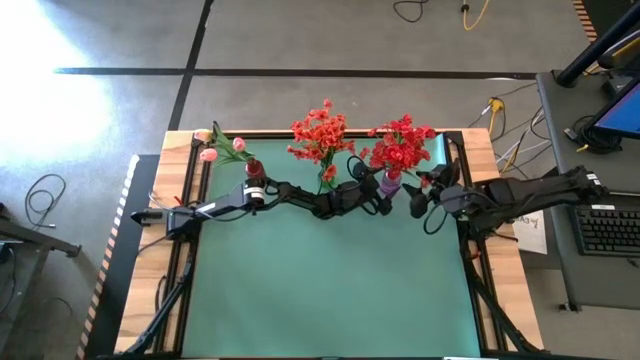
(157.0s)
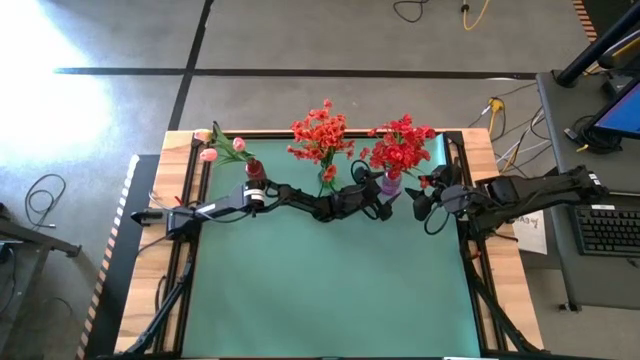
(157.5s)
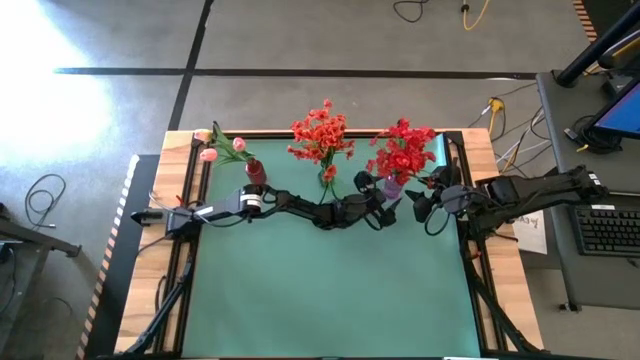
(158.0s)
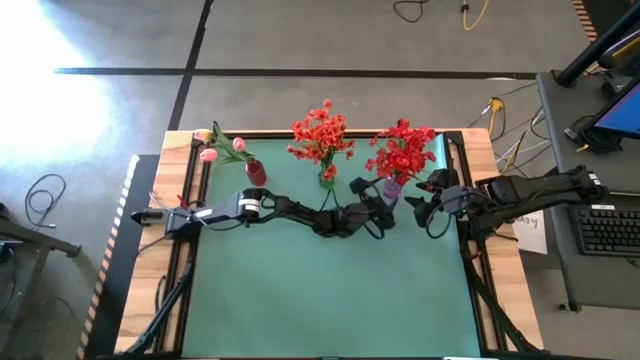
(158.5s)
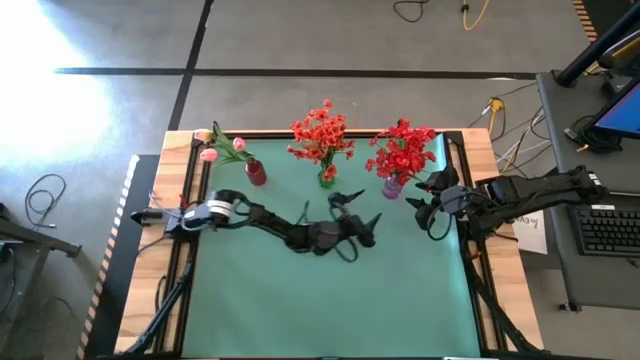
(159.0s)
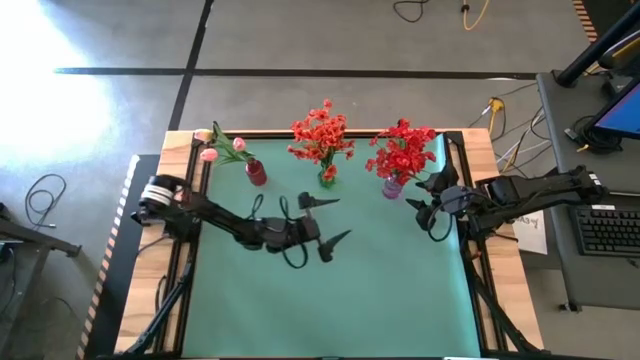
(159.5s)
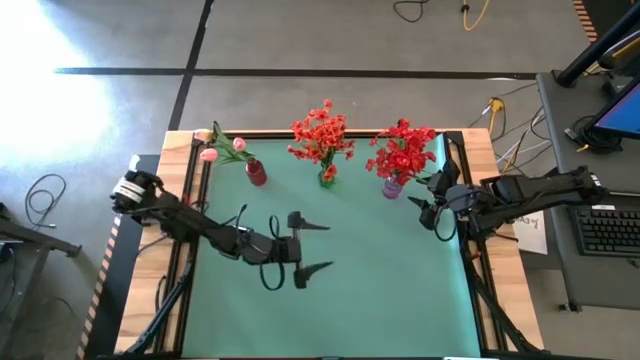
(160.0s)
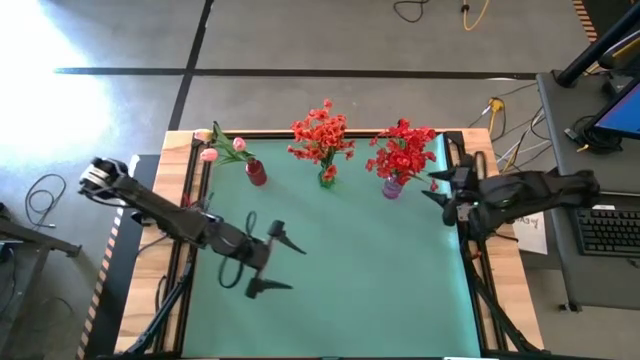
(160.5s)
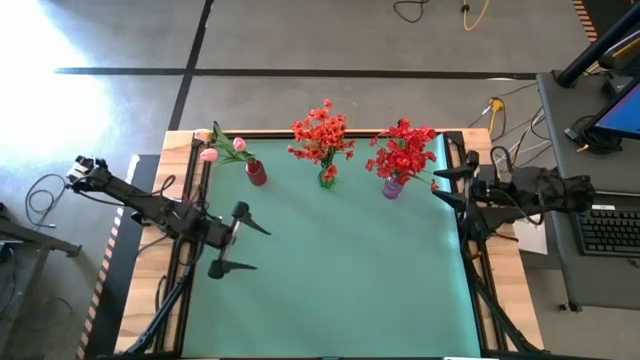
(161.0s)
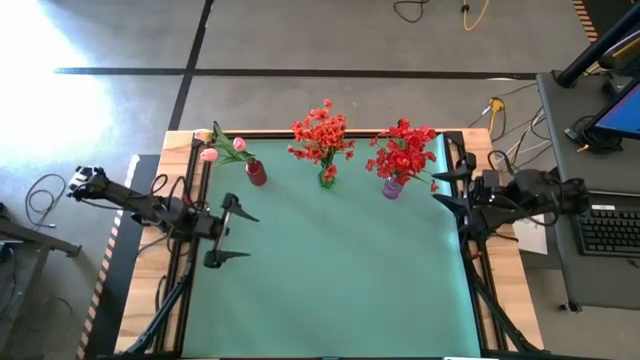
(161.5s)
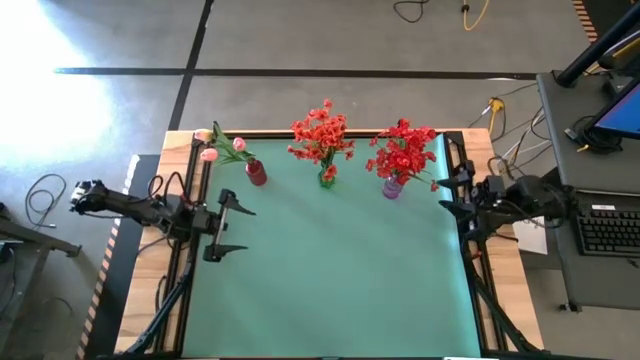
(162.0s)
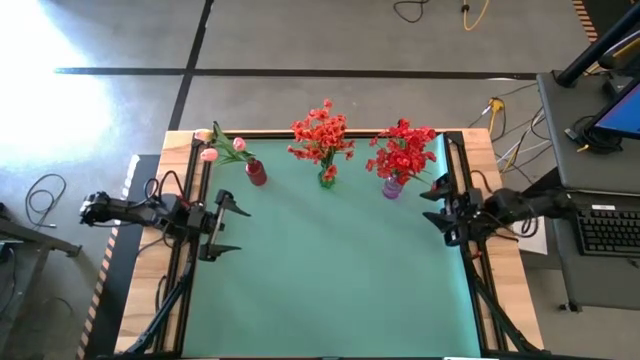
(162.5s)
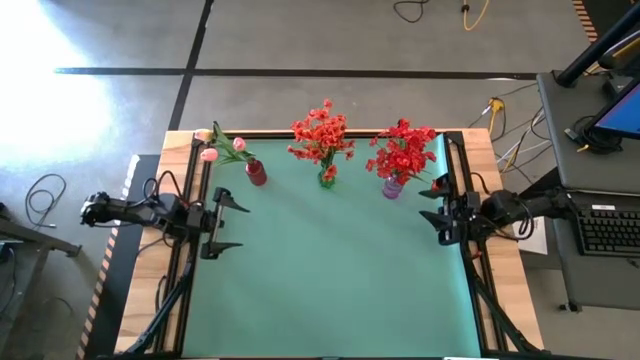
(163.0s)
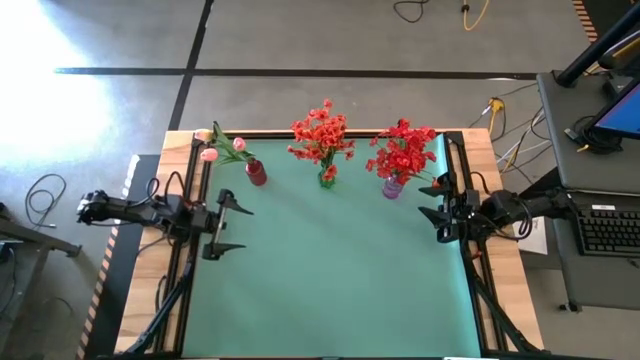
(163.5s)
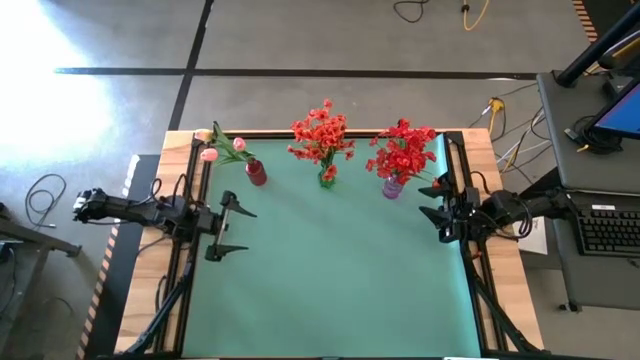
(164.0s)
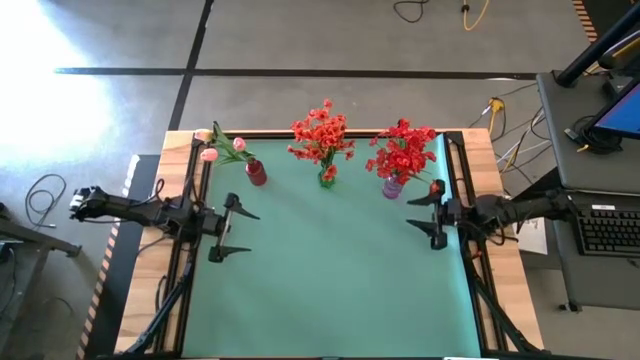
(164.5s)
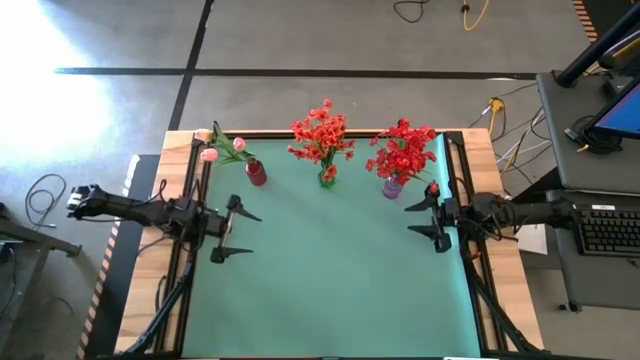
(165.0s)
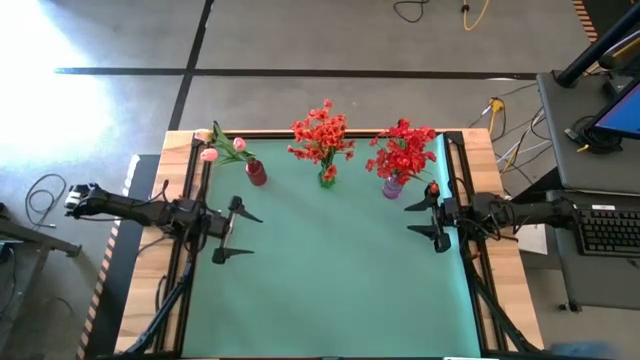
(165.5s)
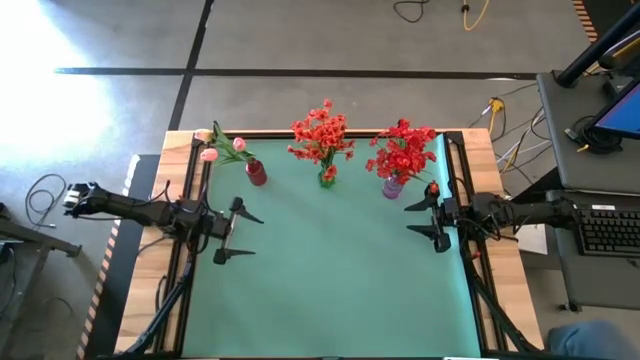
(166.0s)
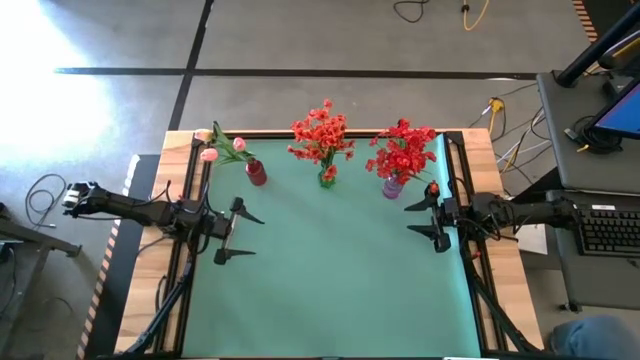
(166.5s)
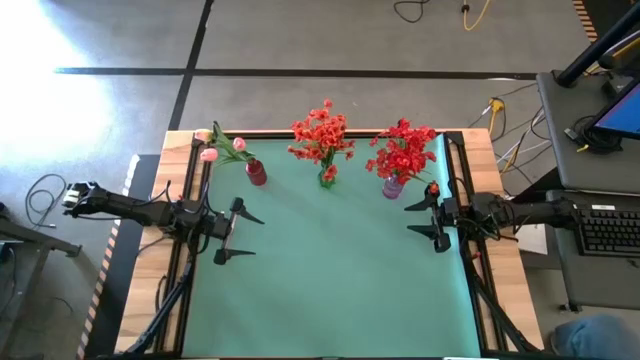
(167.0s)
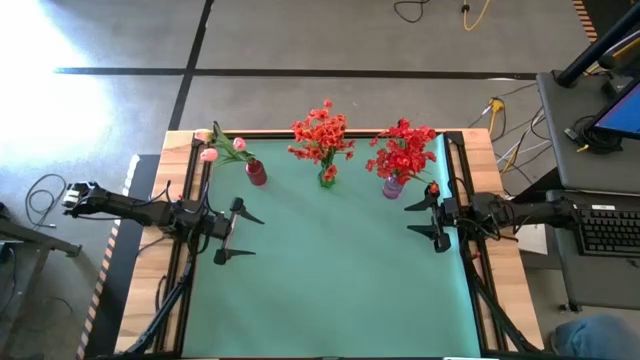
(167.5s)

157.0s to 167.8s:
Task: Sort flowers into vase by color
Return to Home Position

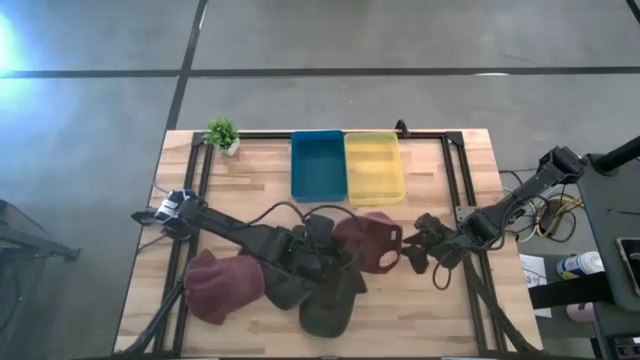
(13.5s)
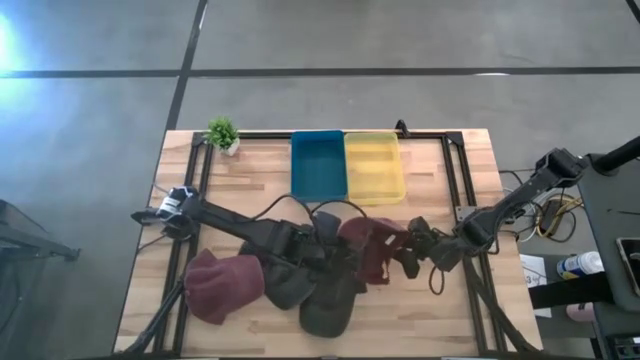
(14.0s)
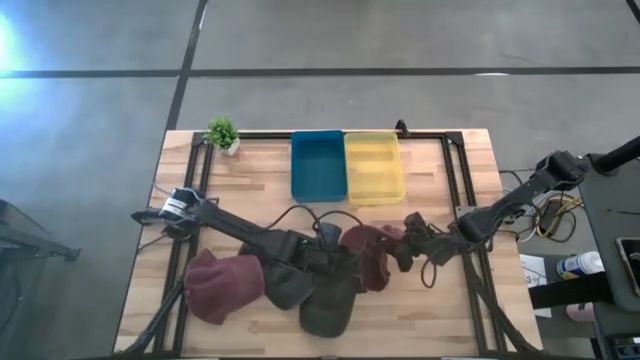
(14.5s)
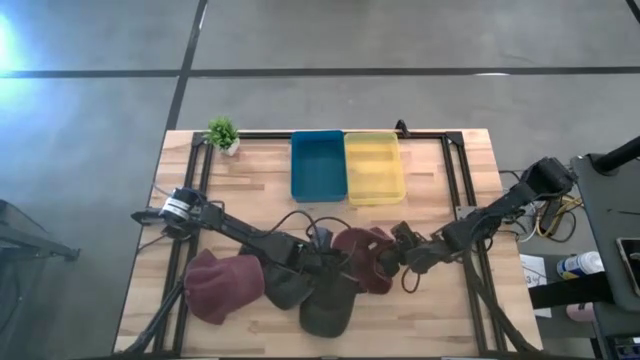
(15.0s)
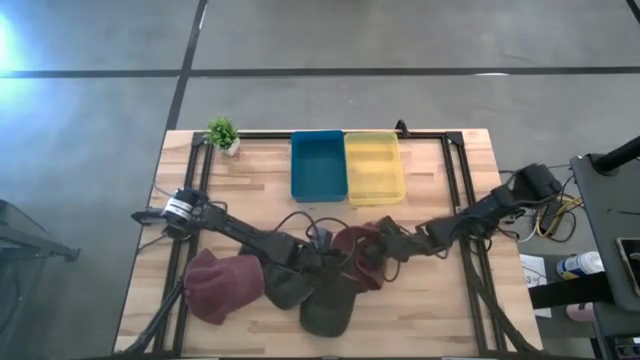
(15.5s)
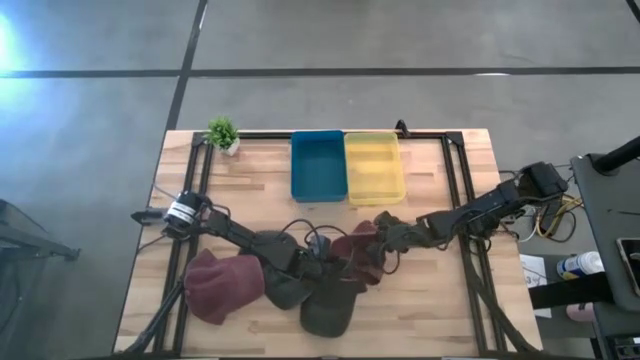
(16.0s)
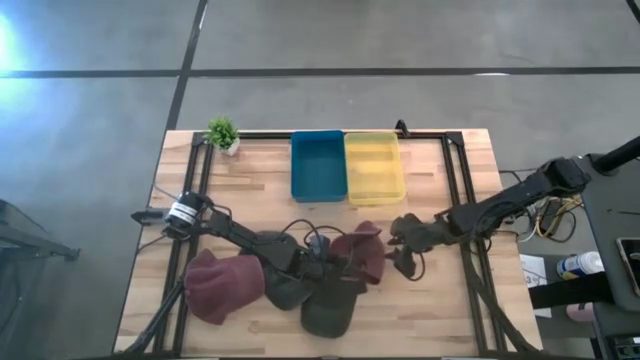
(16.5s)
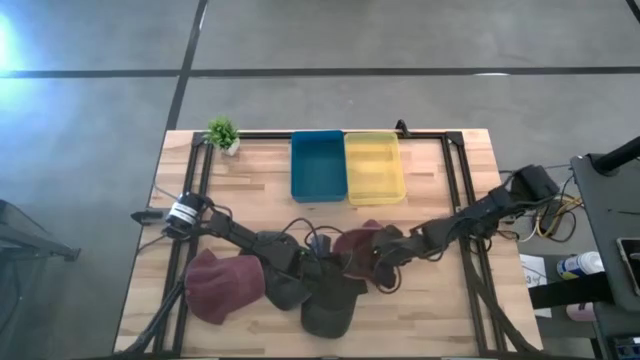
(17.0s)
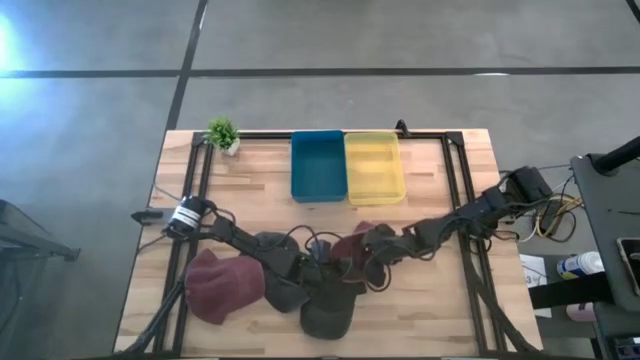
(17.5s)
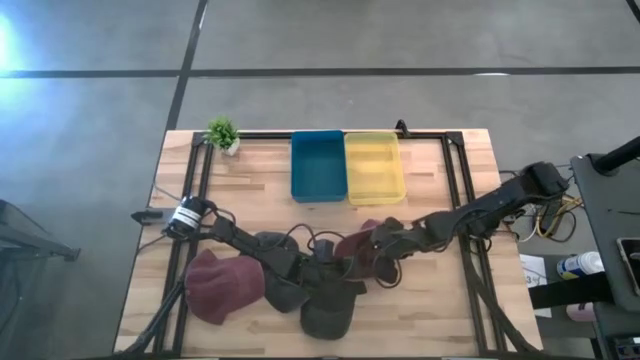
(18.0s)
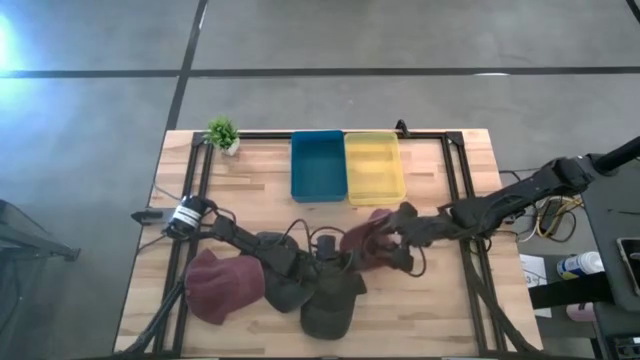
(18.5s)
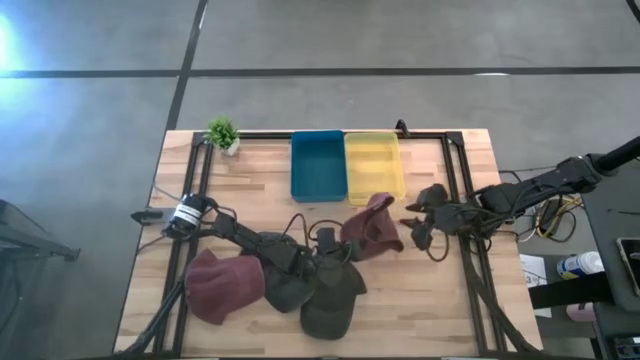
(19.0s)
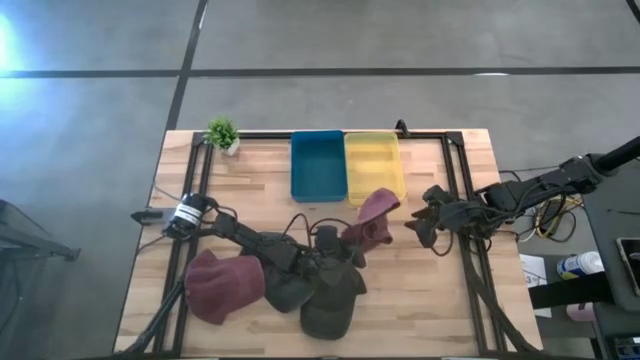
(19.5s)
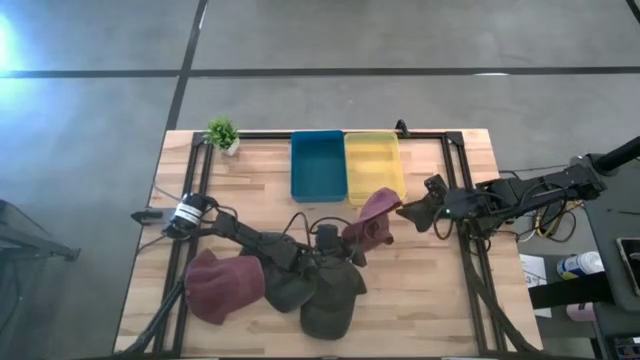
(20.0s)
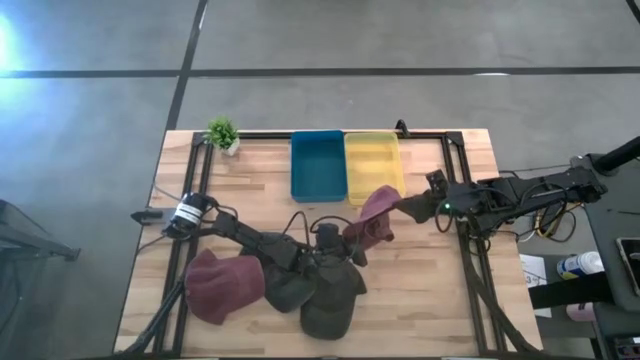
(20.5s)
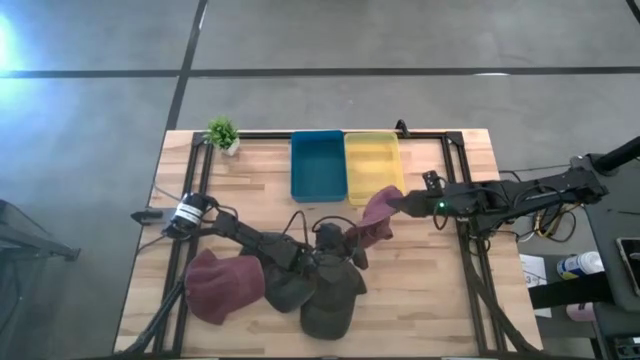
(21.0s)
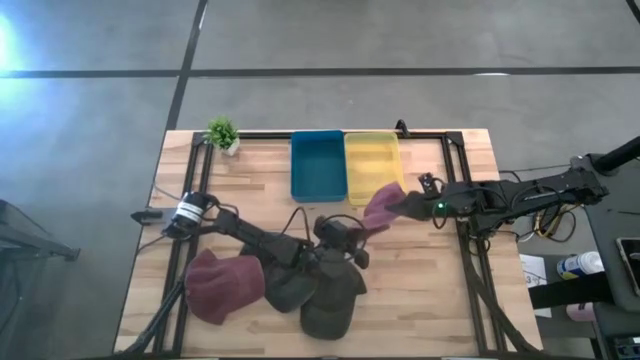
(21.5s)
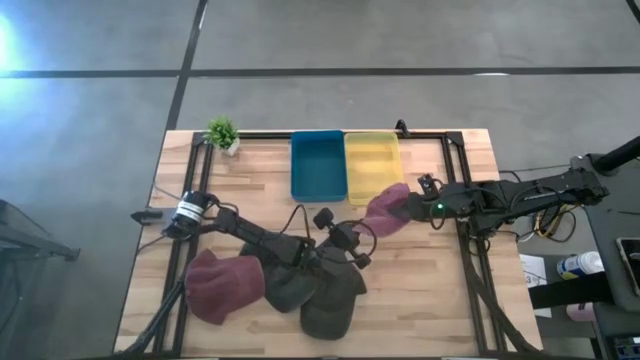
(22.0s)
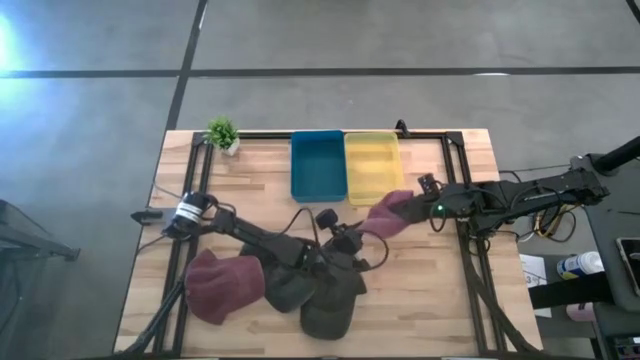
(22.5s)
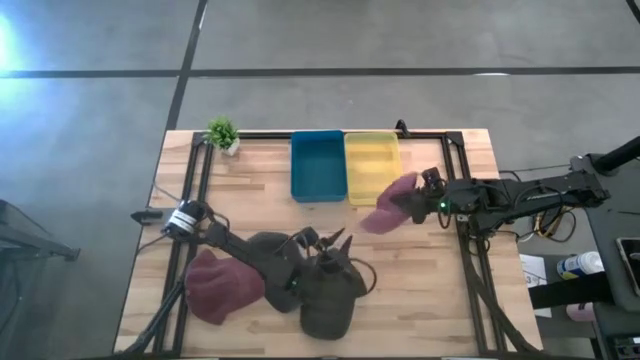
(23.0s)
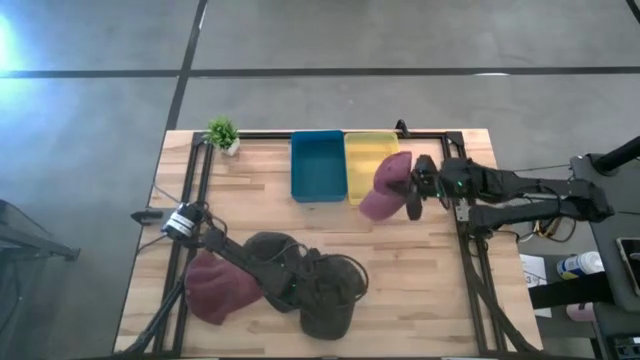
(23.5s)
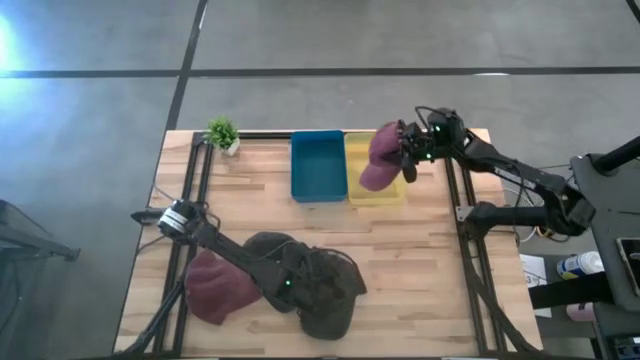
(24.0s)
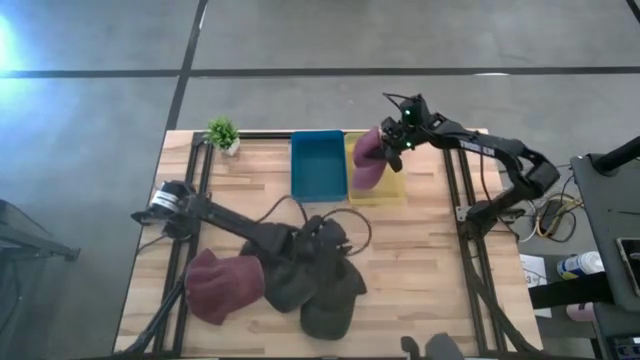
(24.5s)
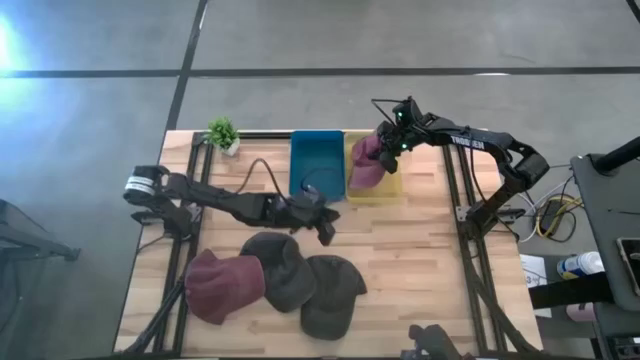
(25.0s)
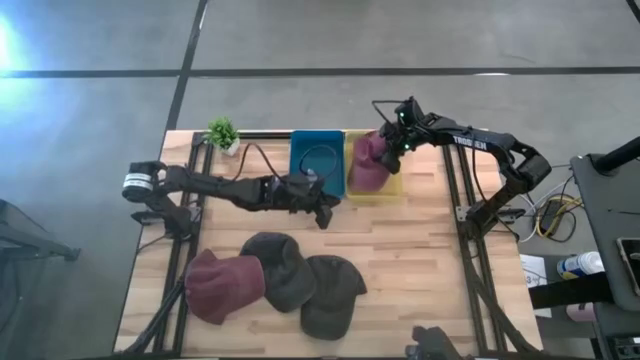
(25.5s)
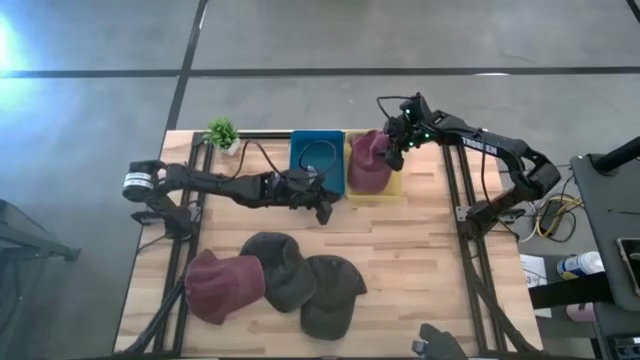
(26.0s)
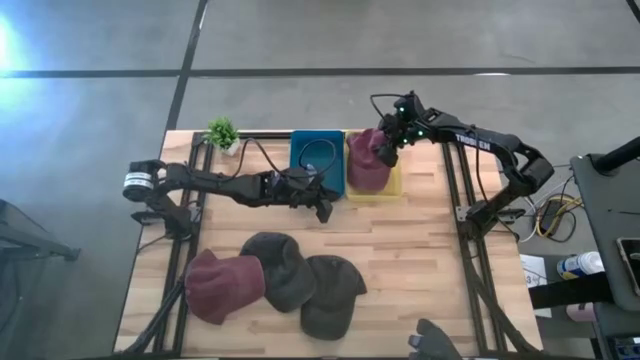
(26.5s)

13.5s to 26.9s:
Task: Pick & Place hat
Put the right red cap into the yellow bin
